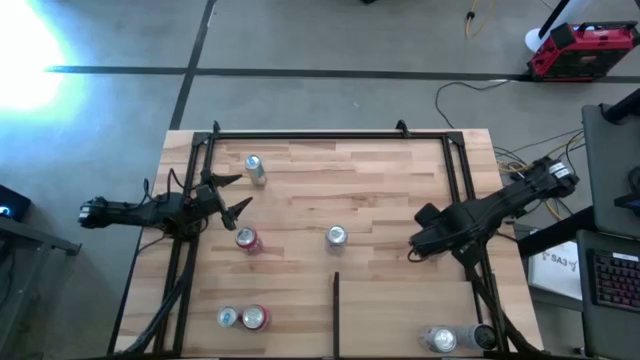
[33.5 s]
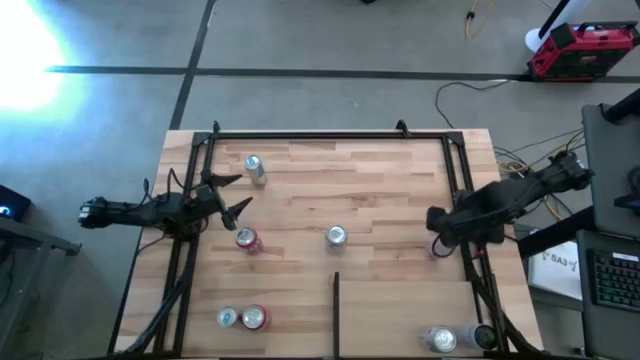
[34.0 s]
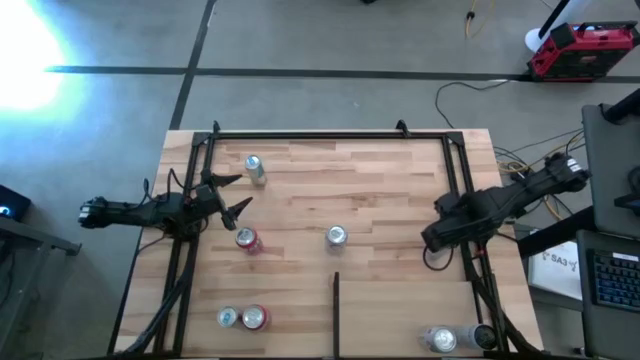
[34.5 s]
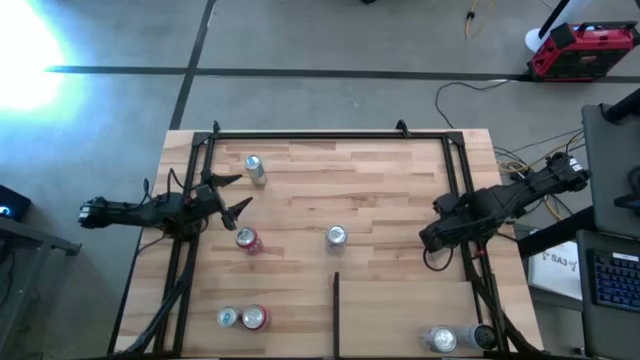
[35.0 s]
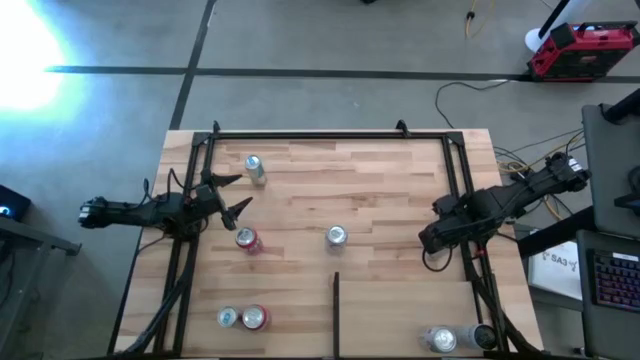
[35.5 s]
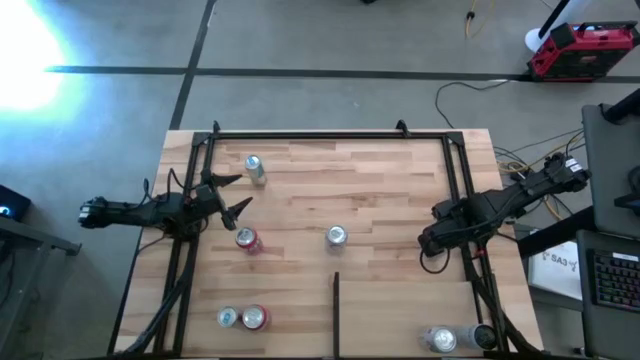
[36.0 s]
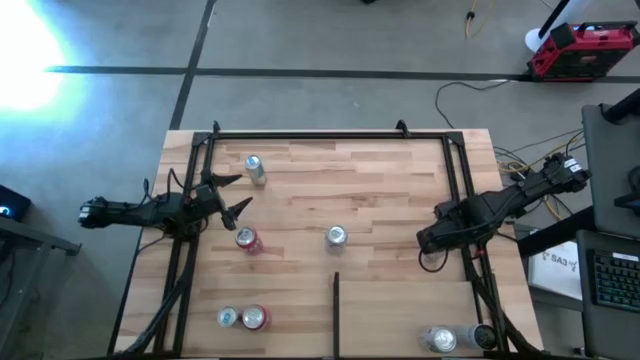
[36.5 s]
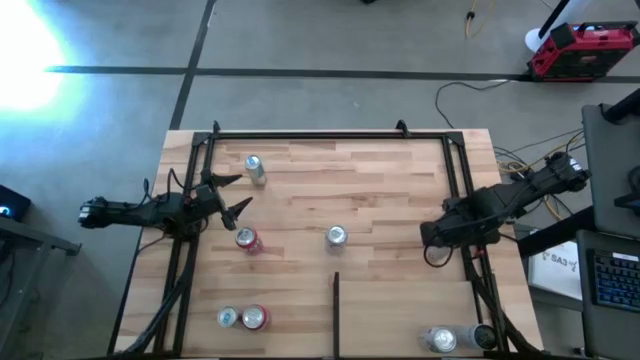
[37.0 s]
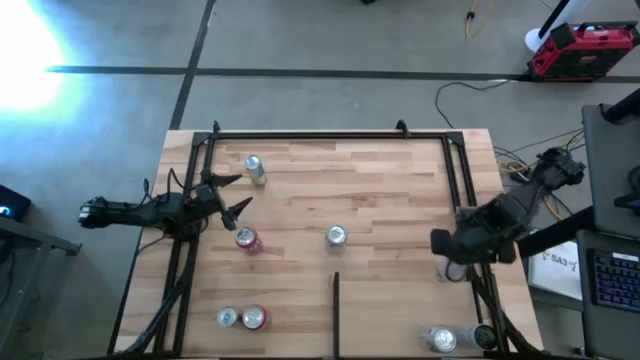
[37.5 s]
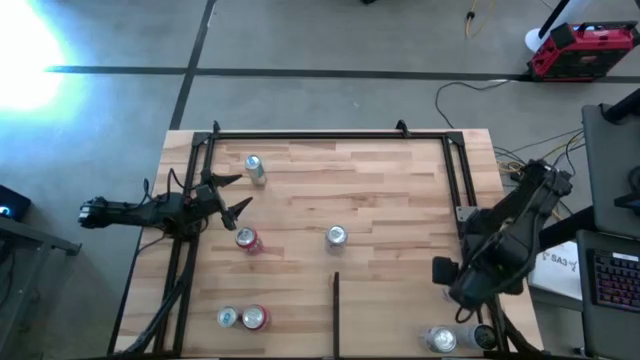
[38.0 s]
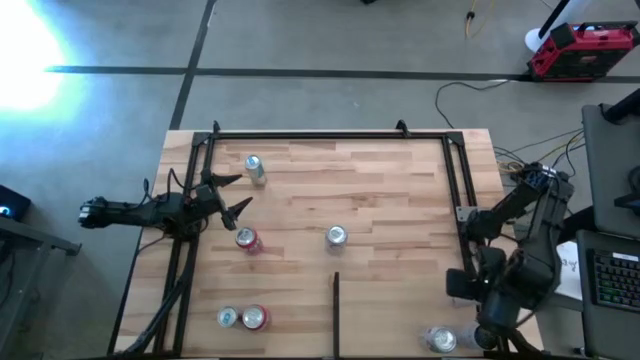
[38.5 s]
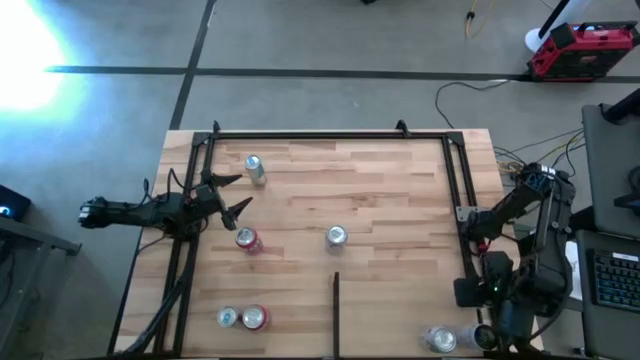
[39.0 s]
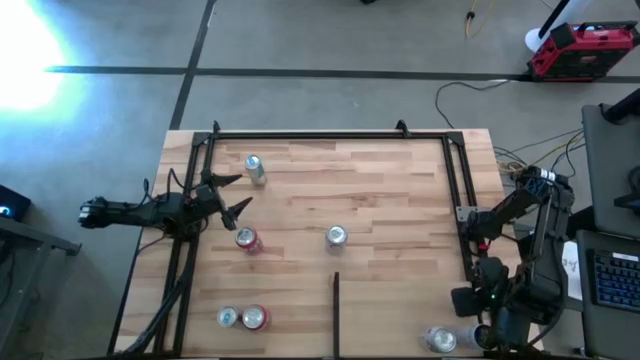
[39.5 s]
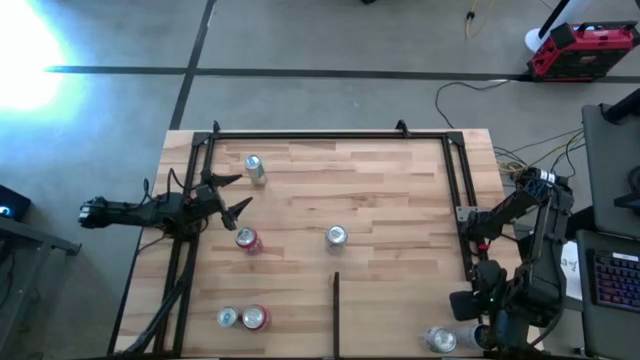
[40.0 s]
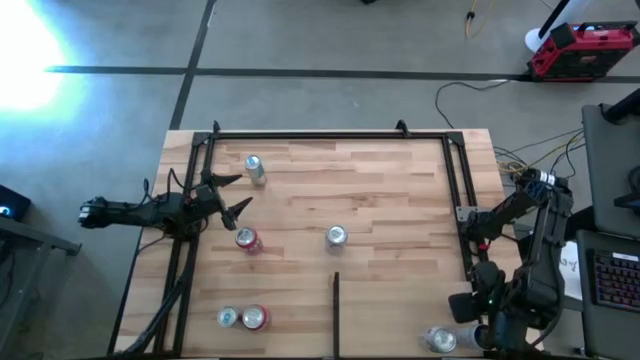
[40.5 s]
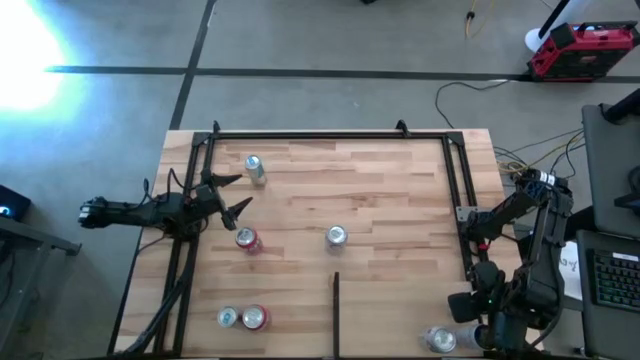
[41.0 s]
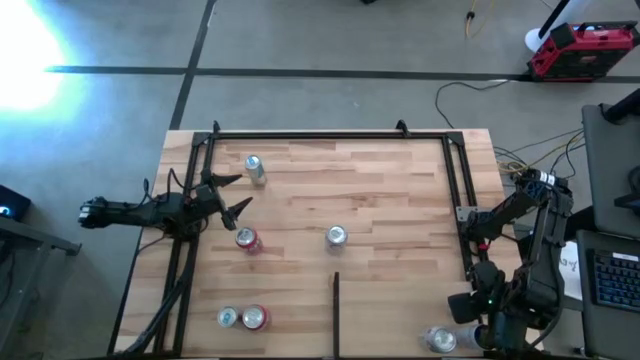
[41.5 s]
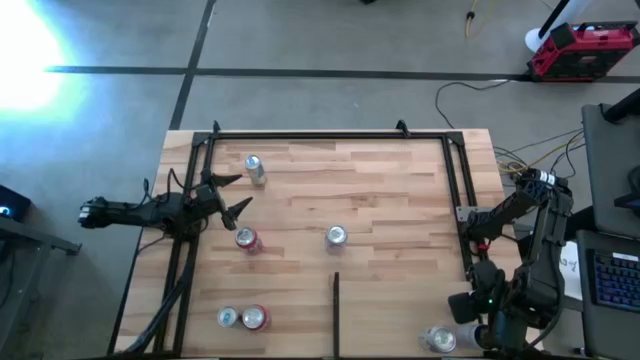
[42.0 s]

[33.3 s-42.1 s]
Task: Place canned beverage on shelf
Put the white soda can aligned with the white soda can on the shelf

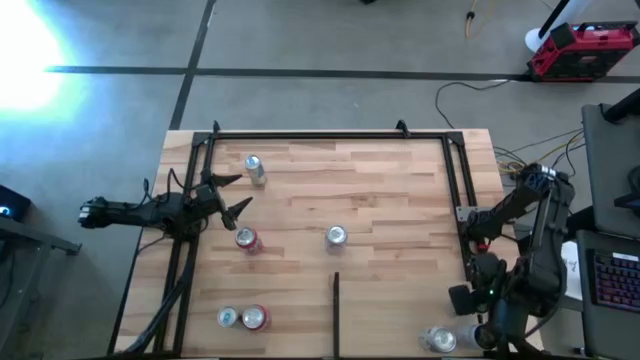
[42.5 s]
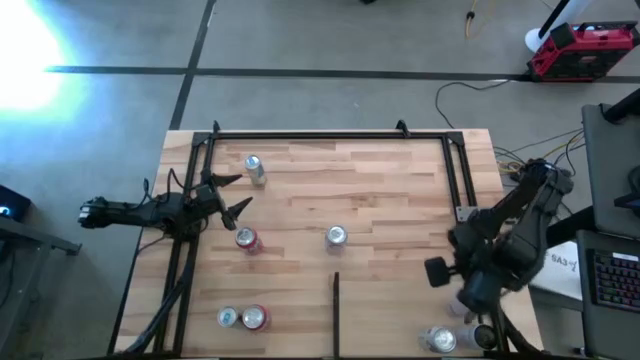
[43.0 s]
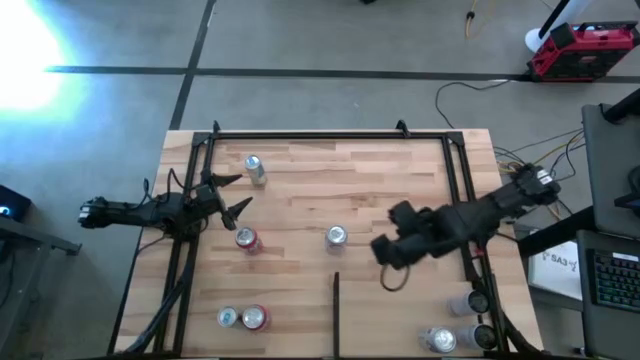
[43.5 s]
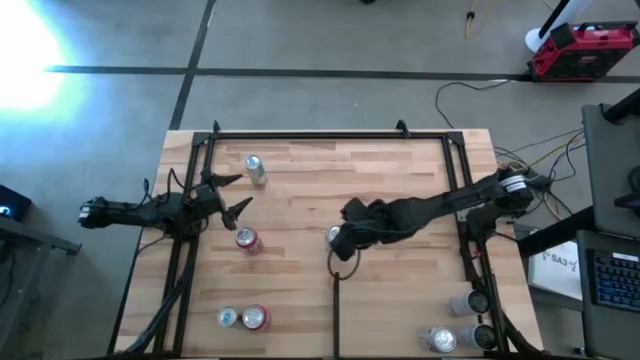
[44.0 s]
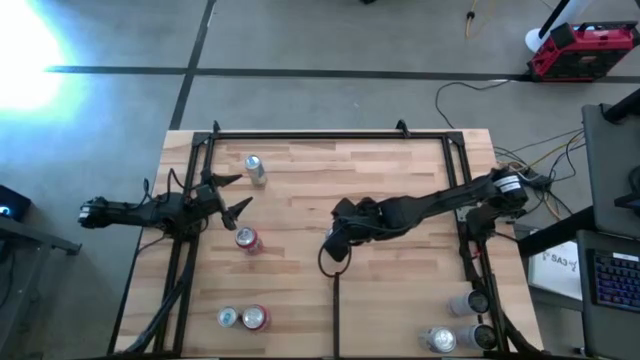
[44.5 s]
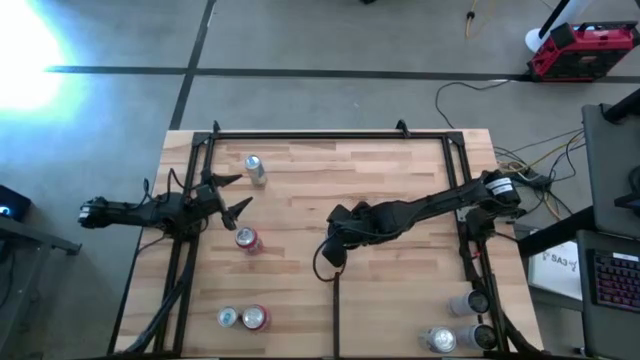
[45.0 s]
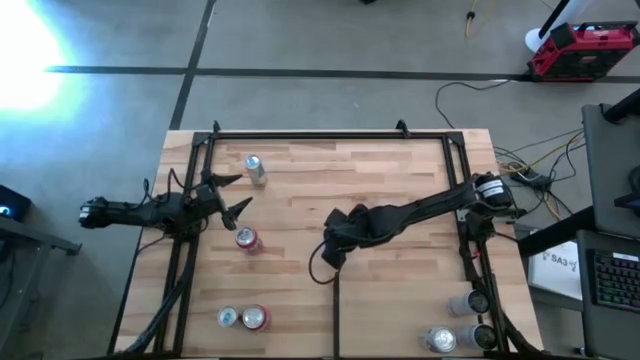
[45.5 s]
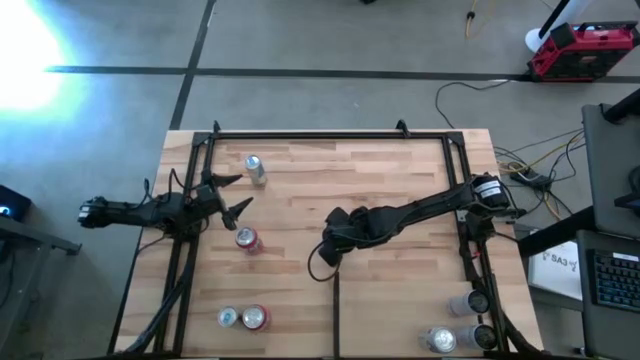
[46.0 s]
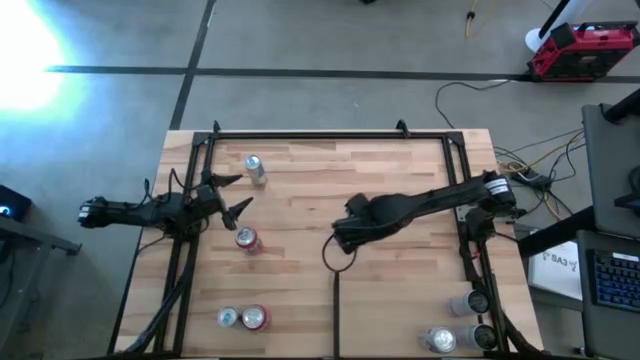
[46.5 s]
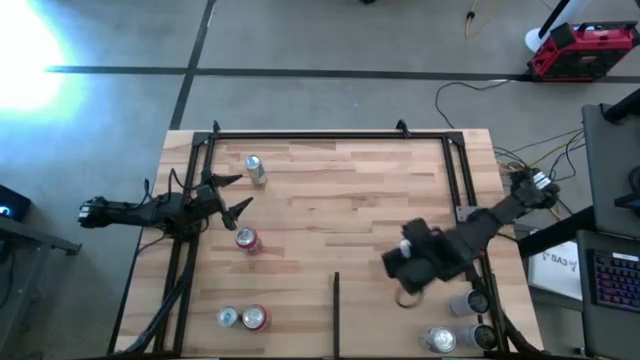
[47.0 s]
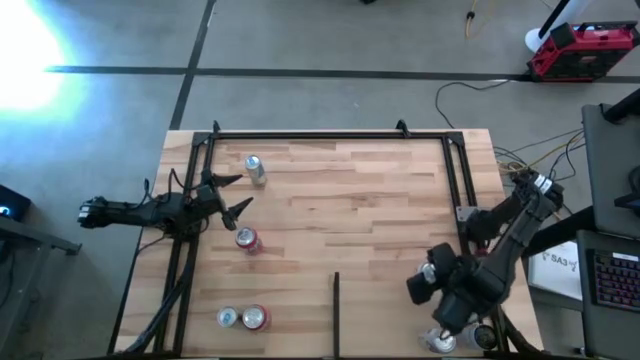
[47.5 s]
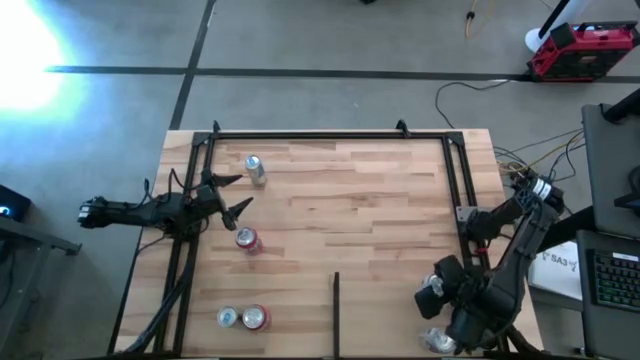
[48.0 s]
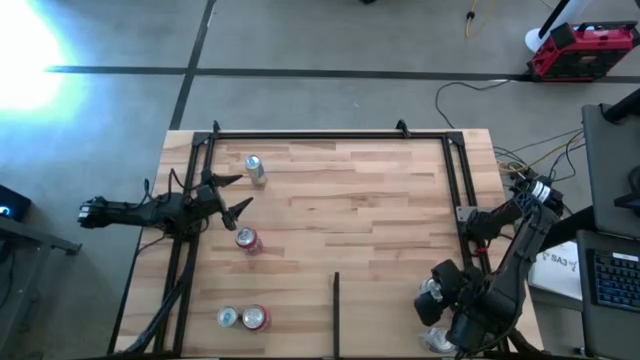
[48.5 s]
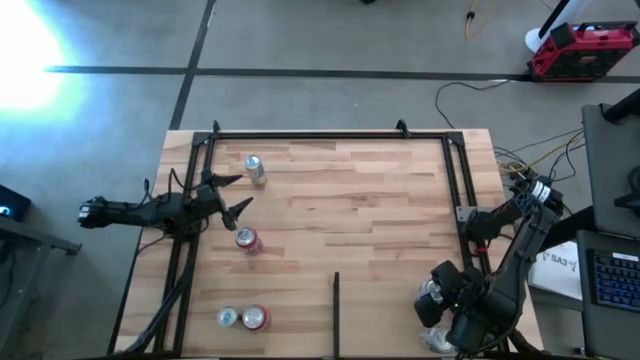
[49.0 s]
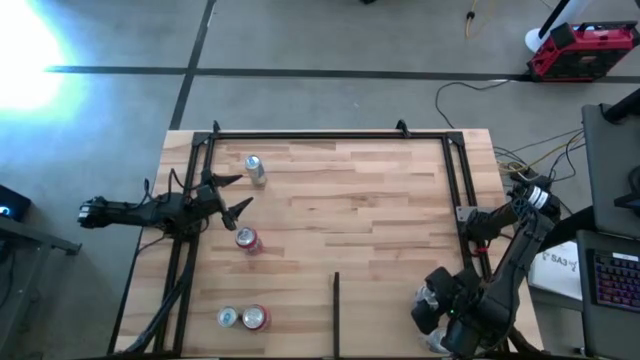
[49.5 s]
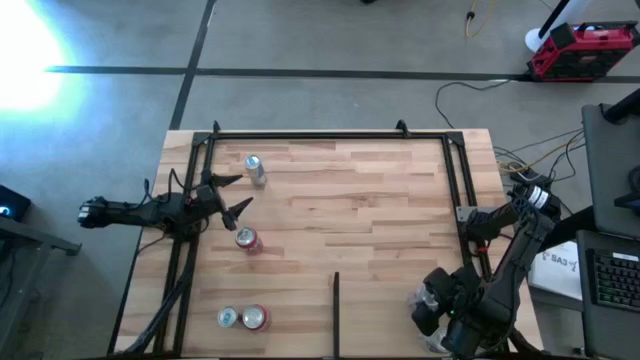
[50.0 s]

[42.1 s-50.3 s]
Put the white/red soda can on the shelf

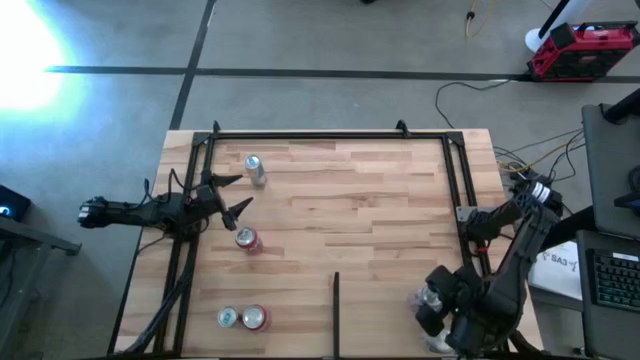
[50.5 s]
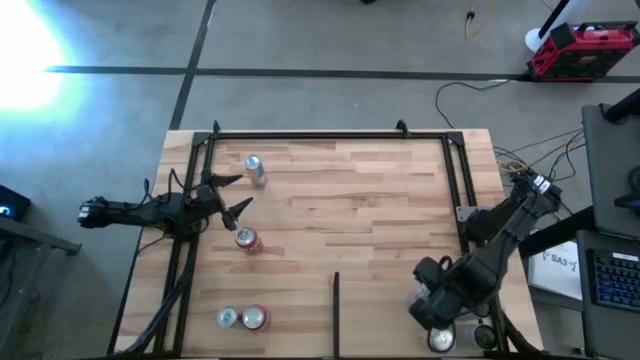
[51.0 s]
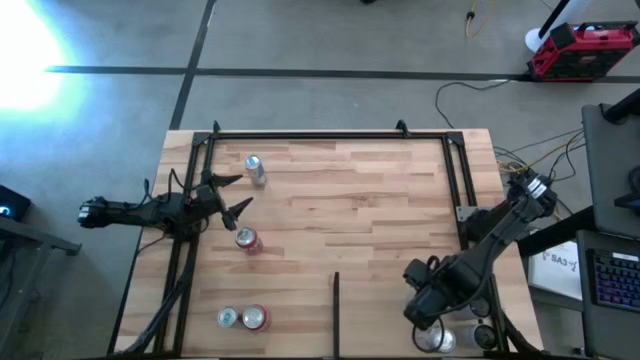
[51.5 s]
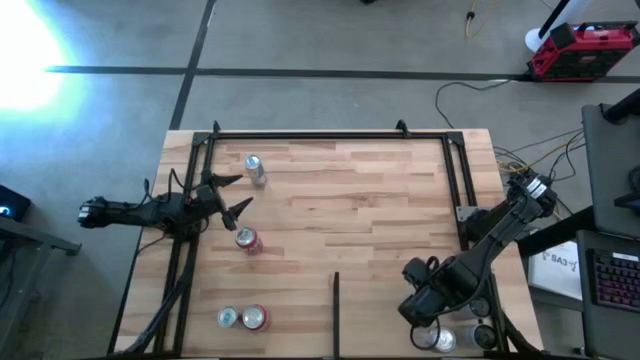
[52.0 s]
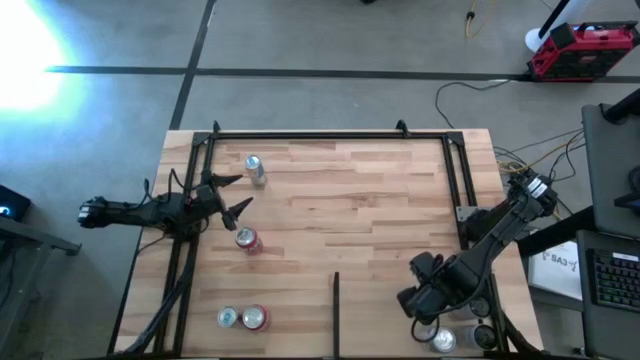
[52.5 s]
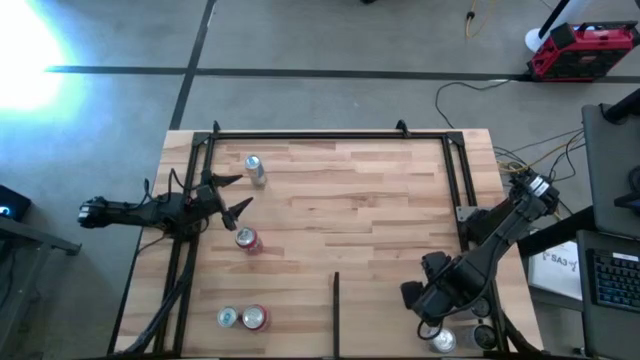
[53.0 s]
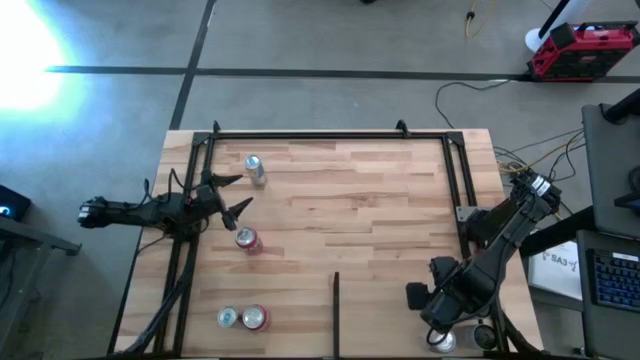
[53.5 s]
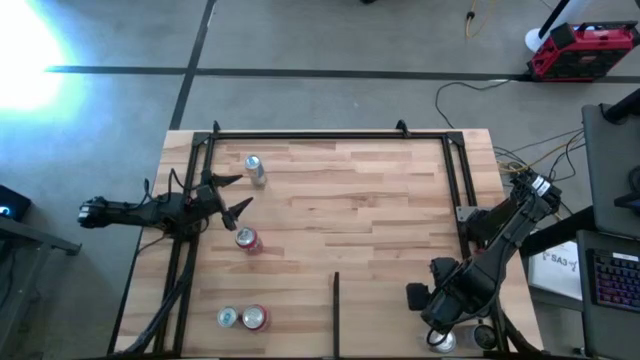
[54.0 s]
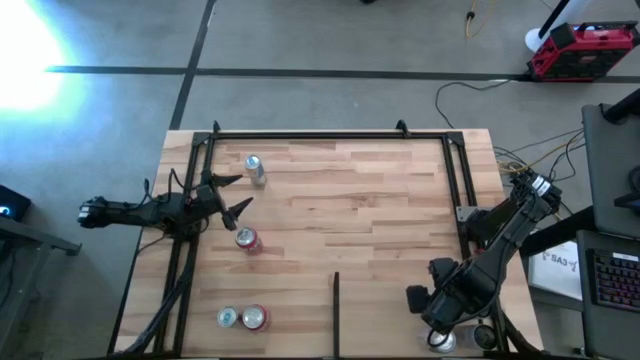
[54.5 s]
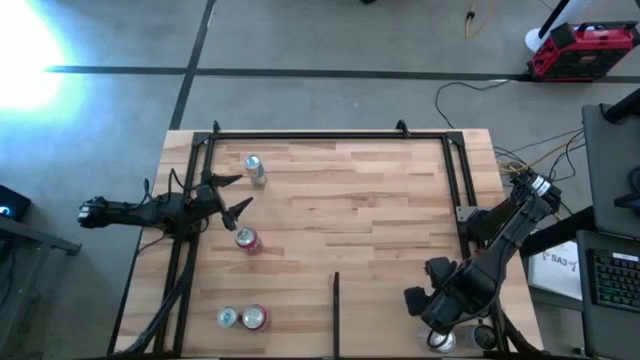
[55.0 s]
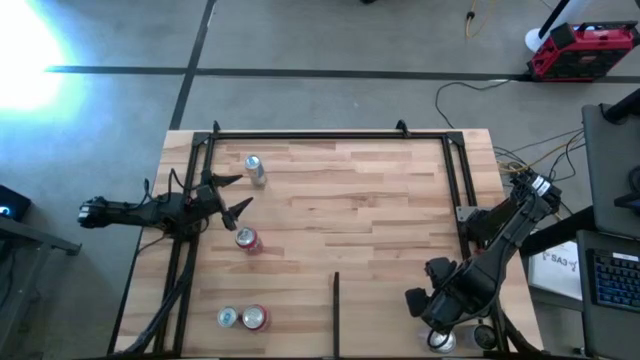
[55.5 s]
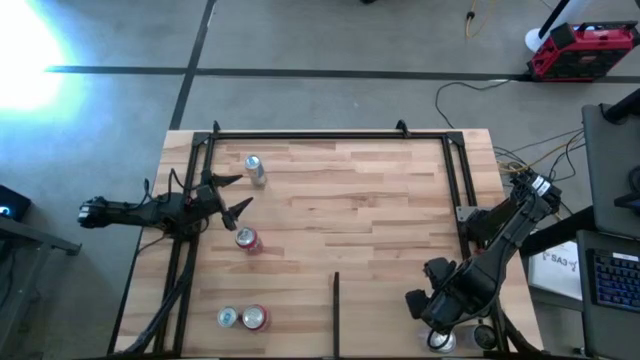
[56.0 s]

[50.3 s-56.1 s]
Adjust the red/white soda can to align with the red/white soda can on the shelf
